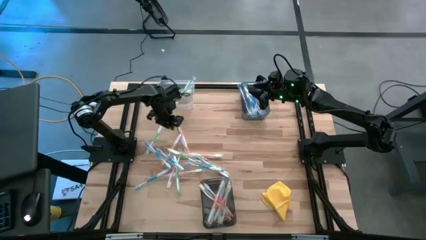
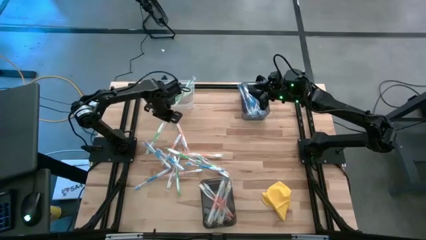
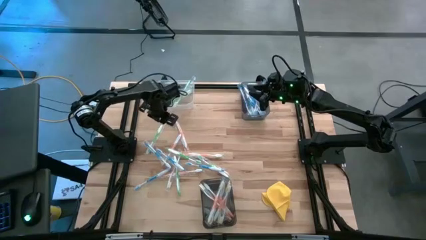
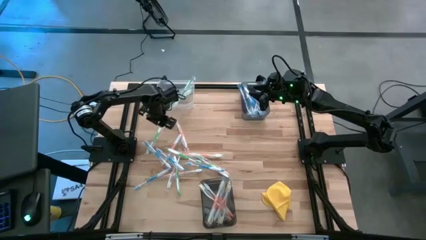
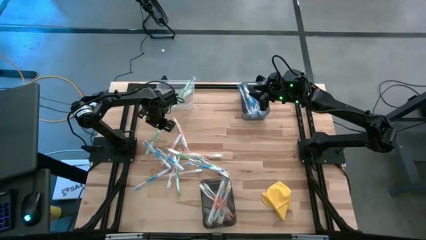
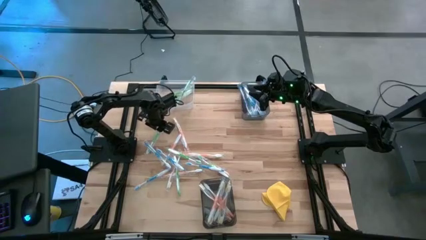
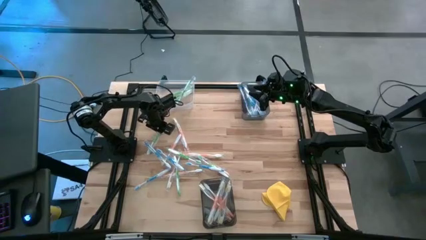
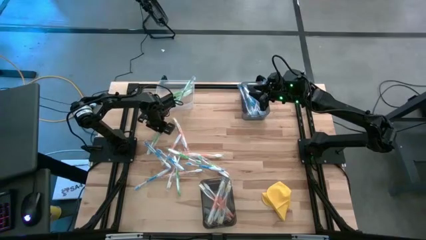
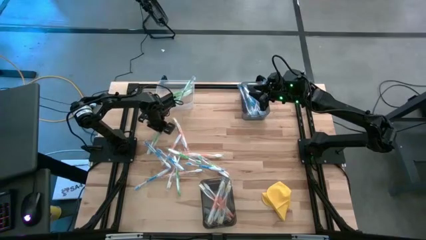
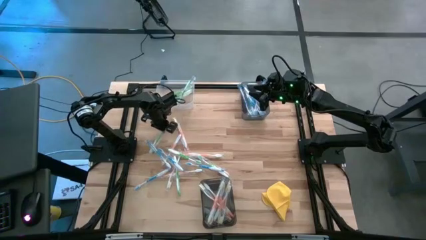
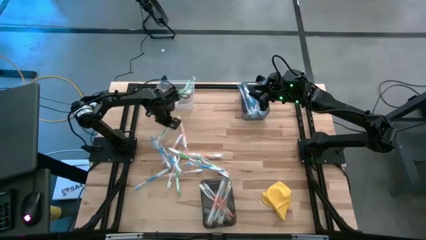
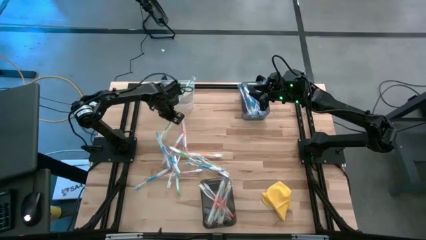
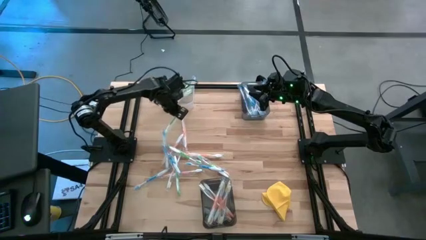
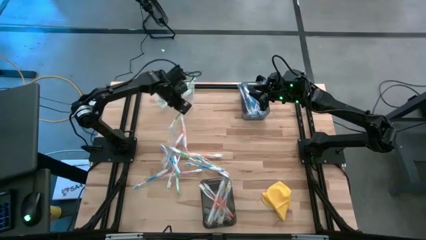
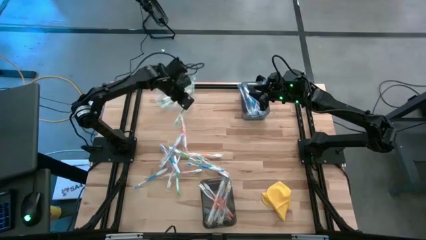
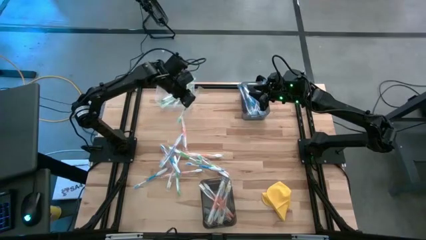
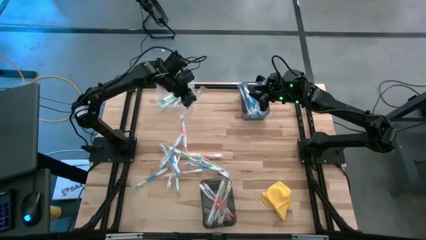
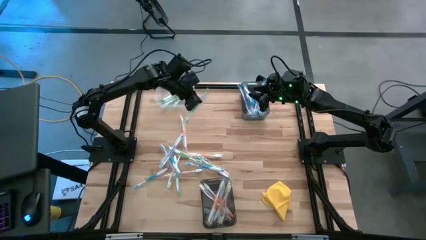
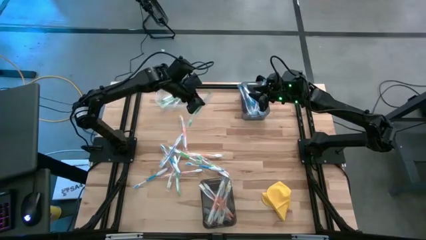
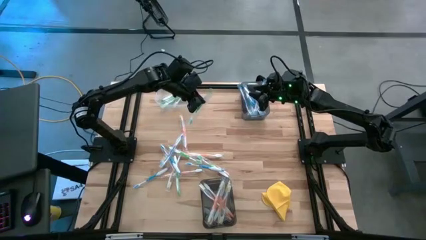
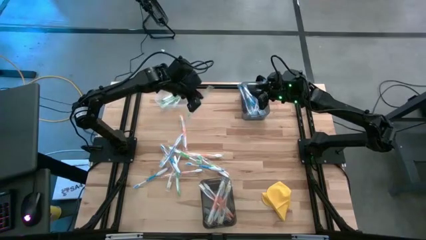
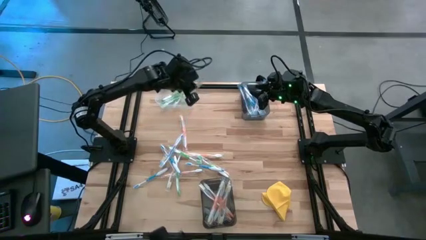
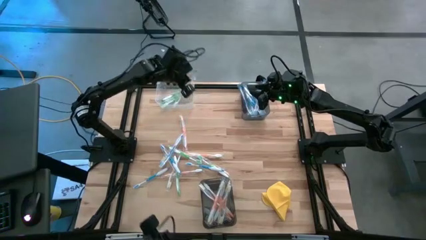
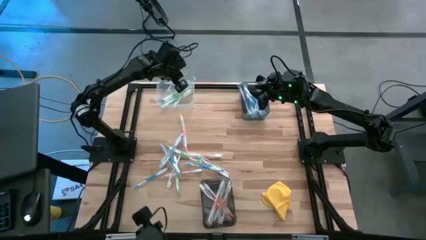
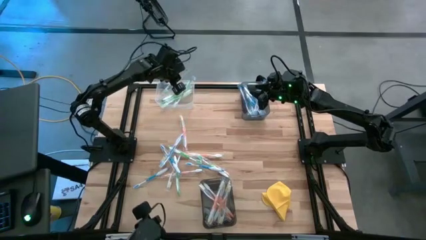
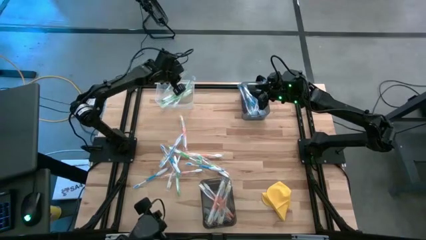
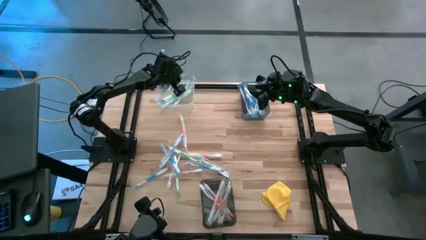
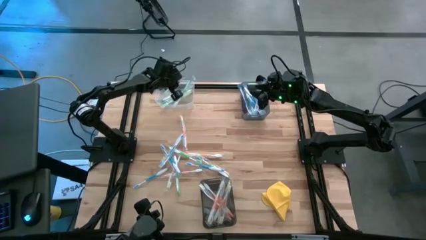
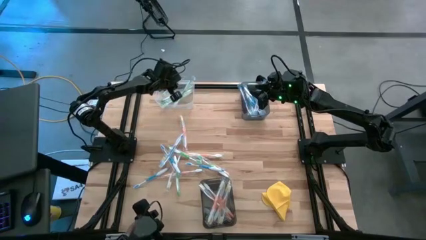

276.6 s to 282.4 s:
Task: Pick & Place Toothbrushes
Put the green toothbrush into the transparent bin

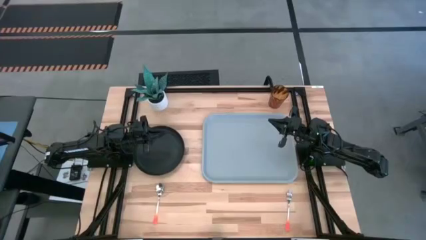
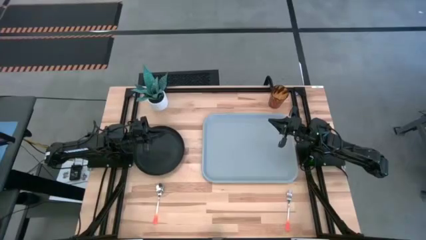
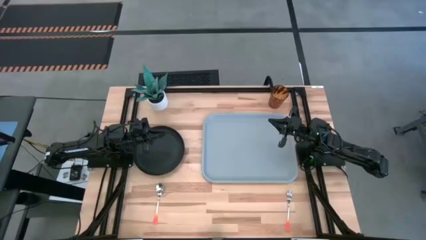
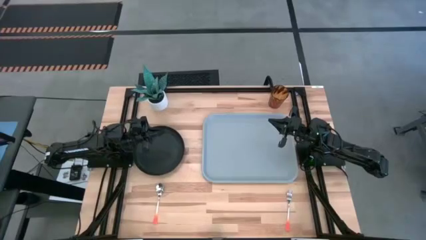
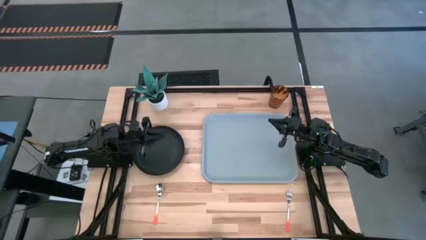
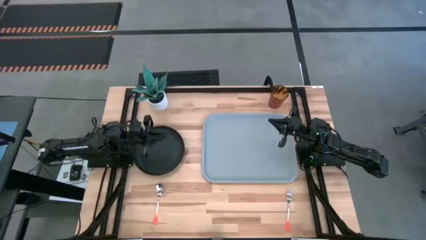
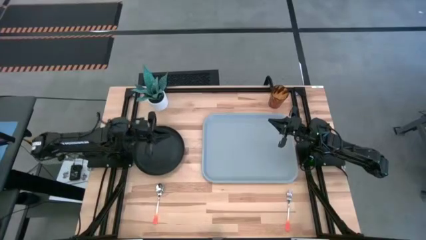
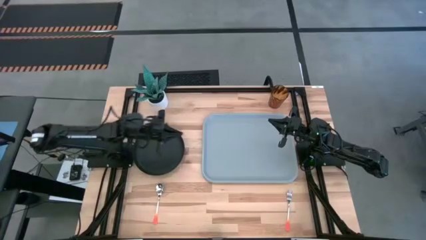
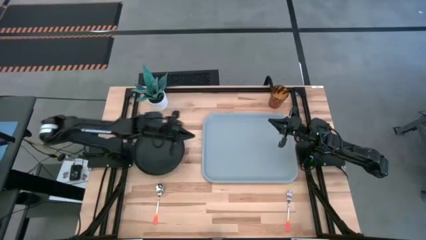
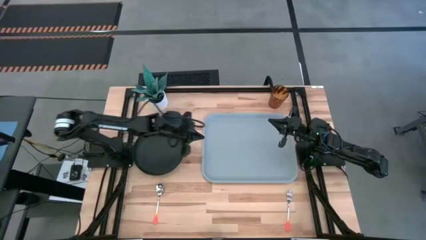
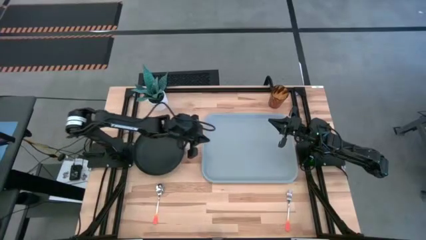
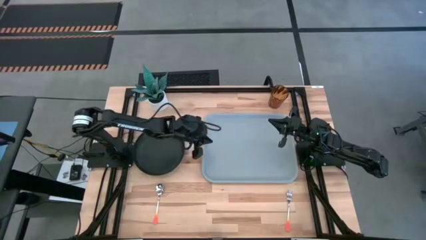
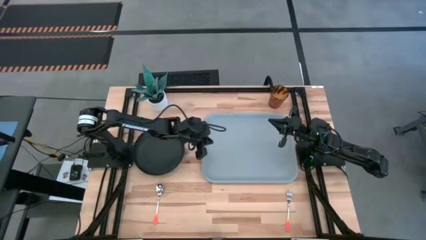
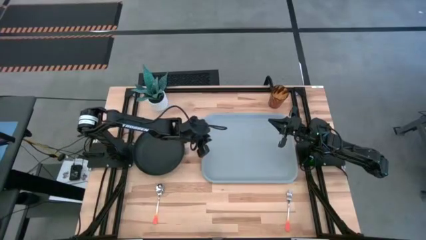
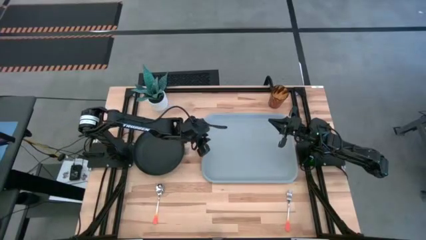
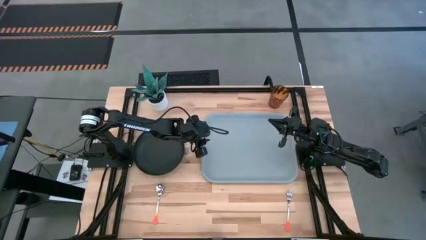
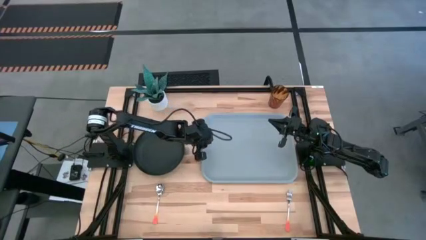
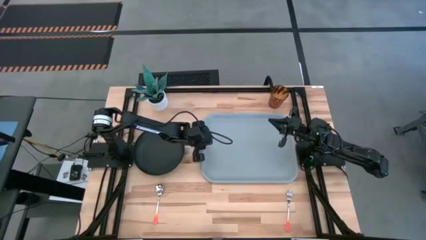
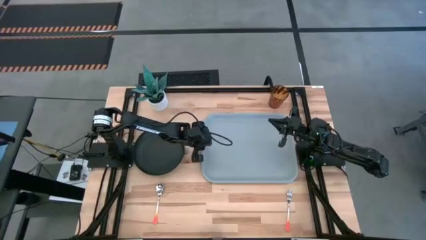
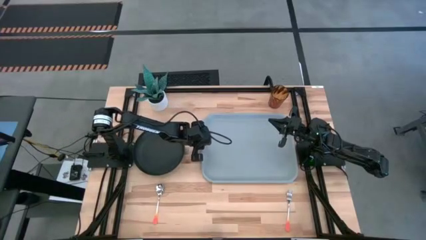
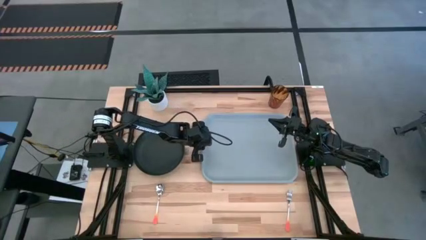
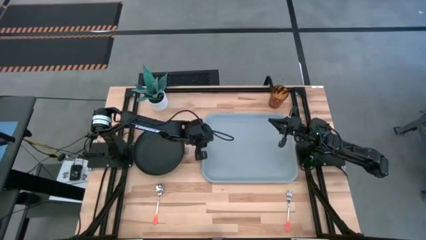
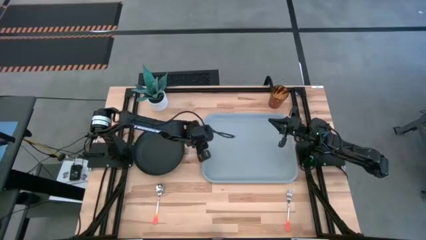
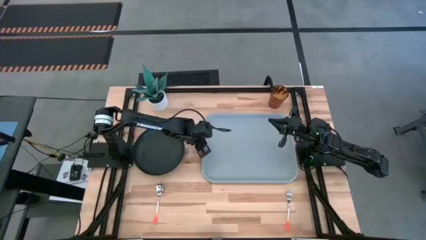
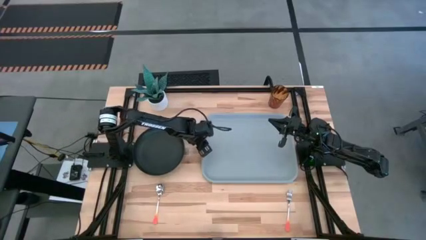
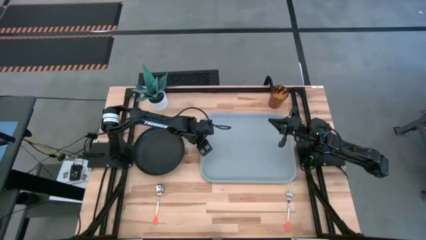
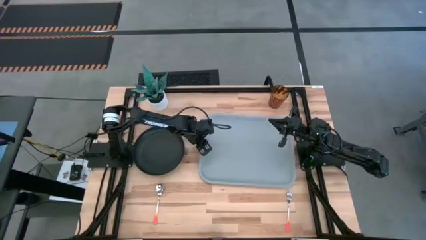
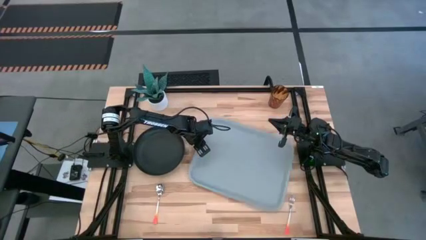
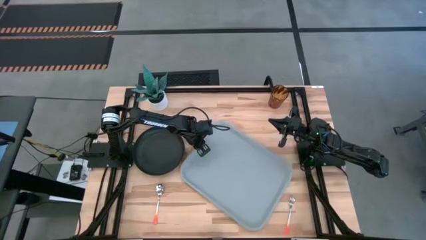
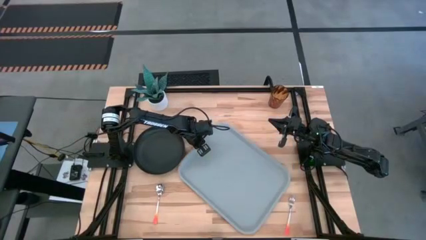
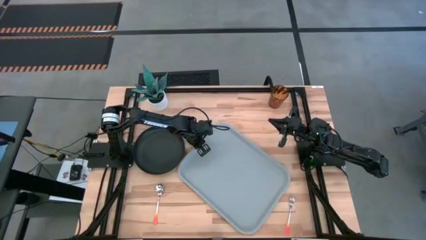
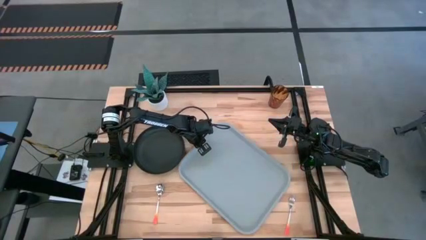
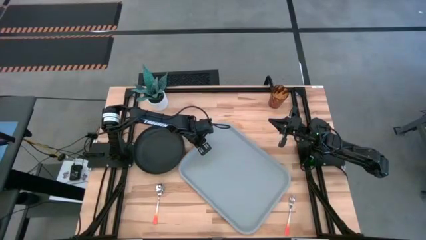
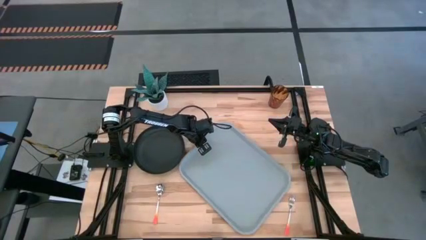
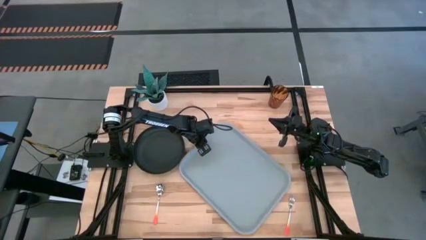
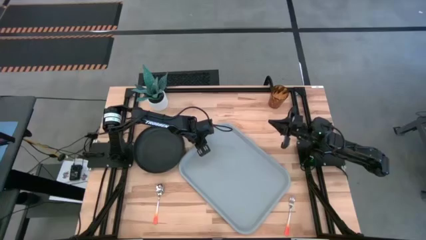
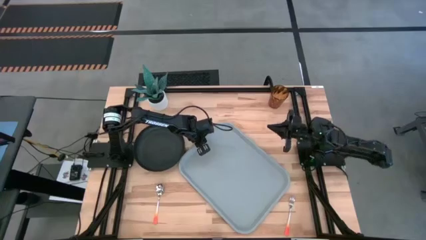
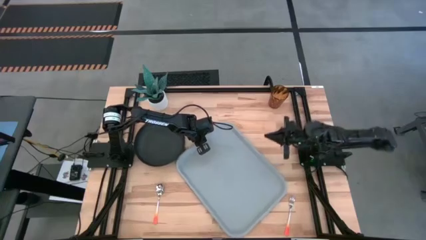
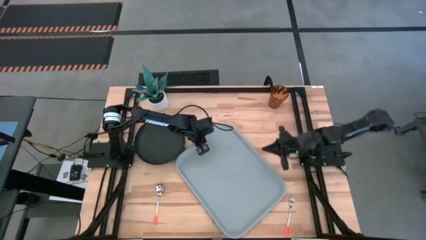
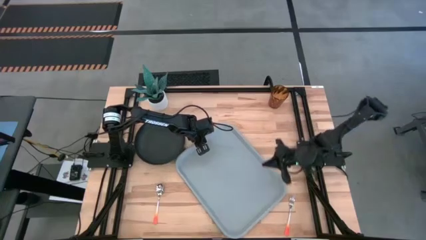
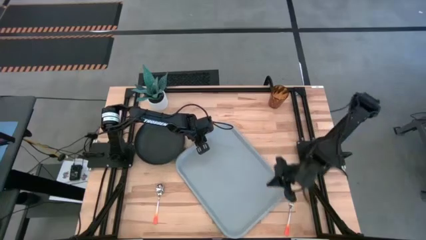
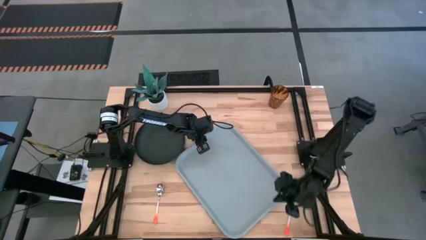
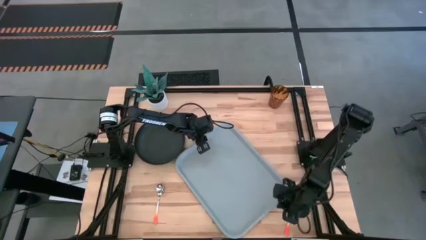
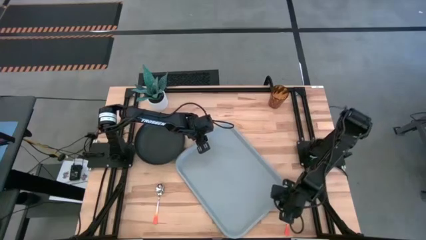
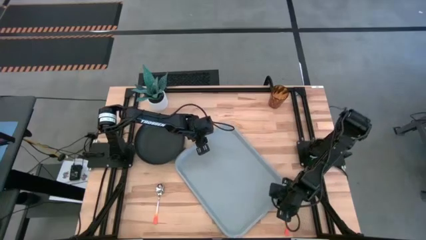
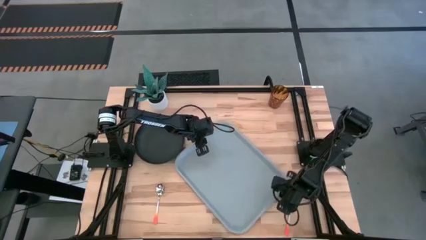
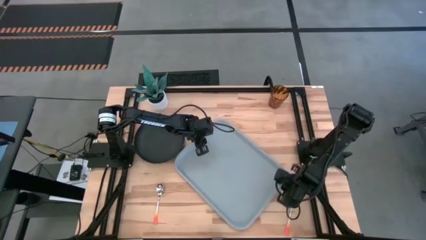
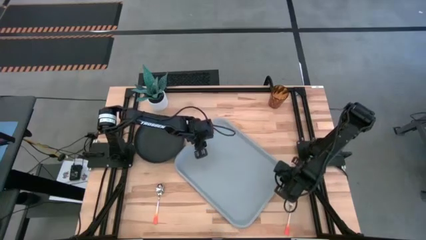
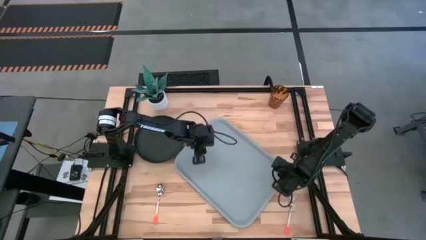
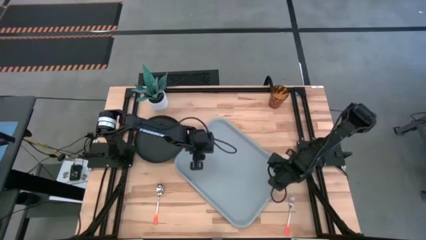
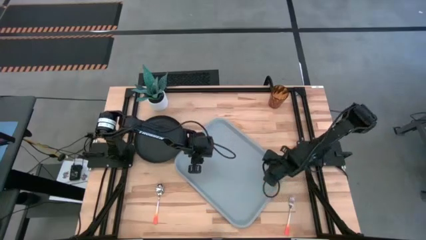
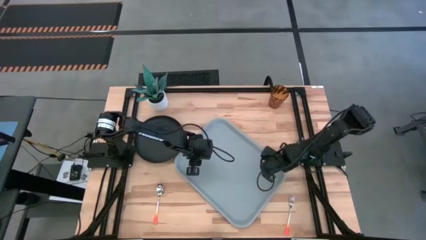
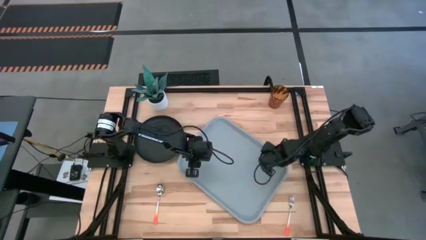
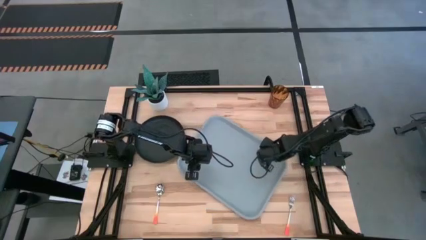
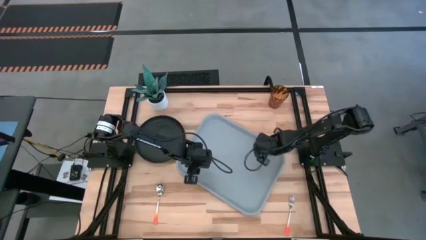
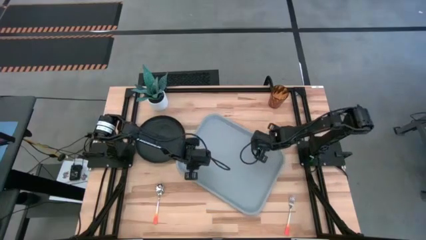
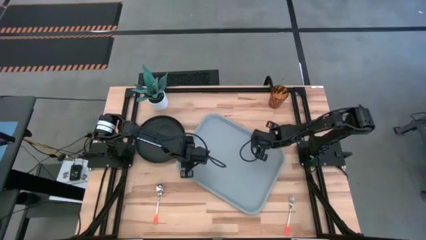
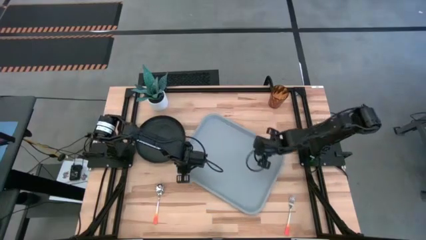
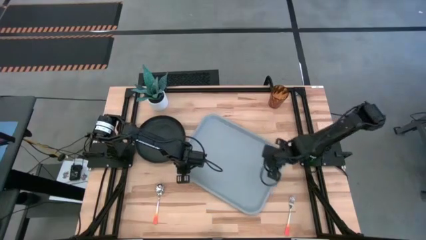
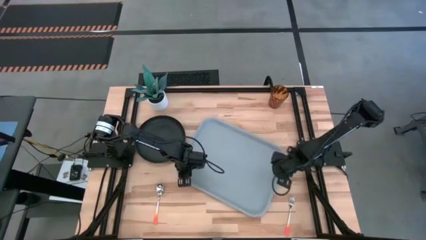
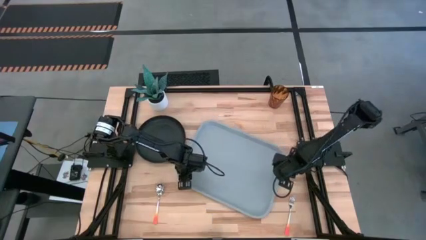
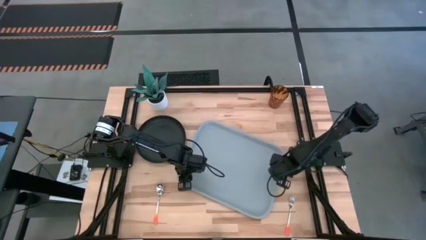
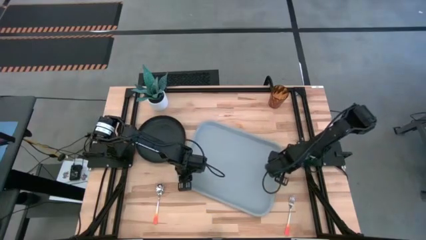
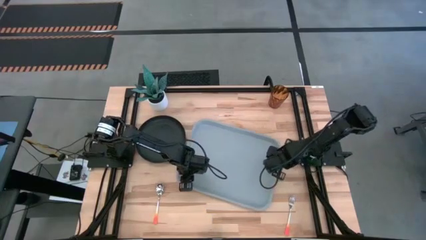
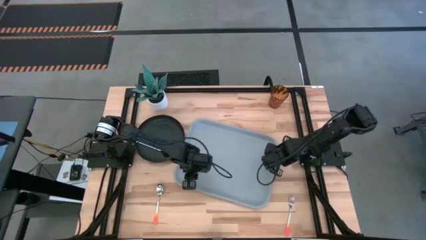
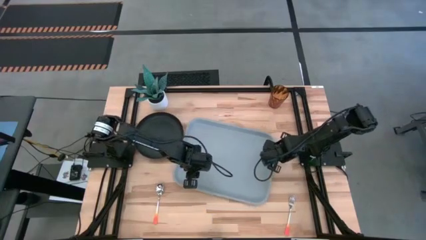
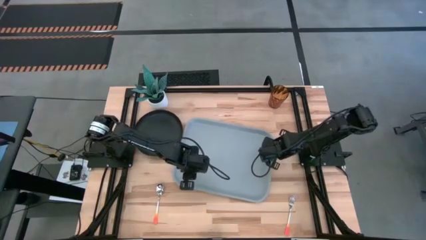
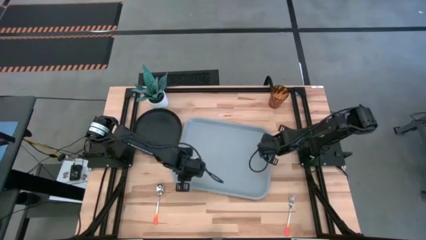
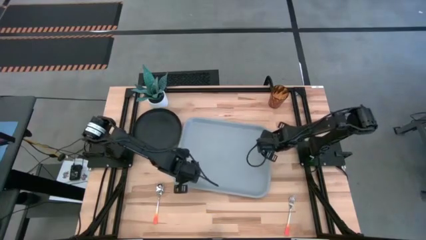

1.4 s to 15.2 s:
Task: Pick and place plate/cup/fork/spoon on tray
Move the gray tray to the center of the table
